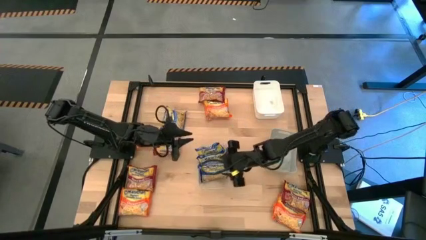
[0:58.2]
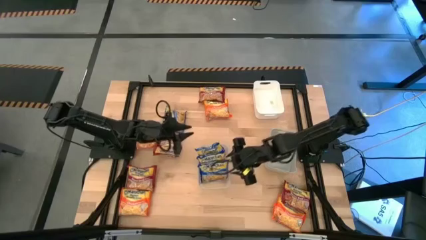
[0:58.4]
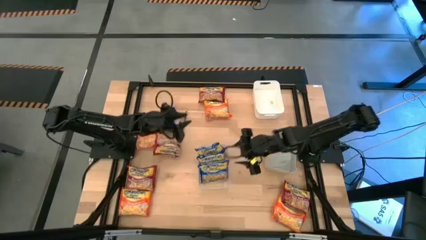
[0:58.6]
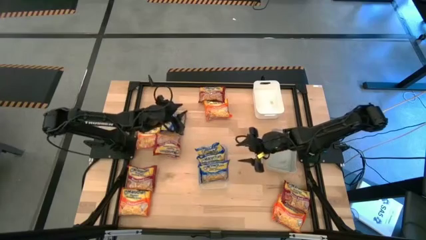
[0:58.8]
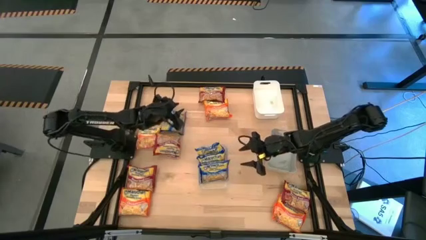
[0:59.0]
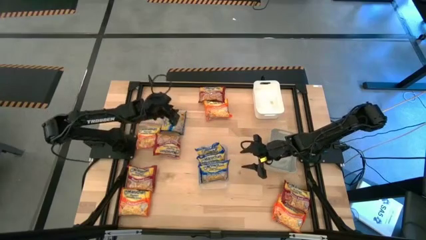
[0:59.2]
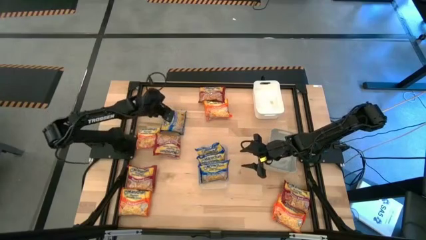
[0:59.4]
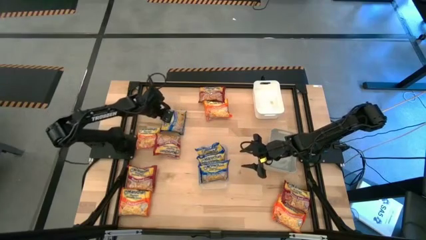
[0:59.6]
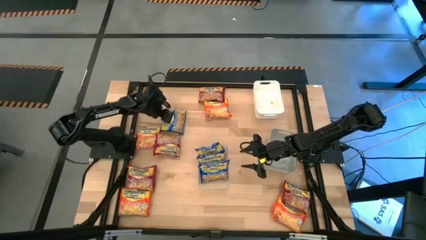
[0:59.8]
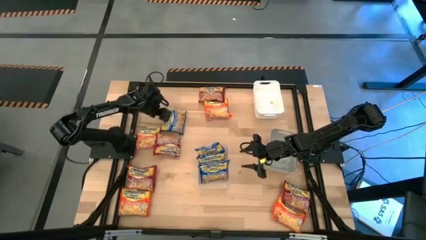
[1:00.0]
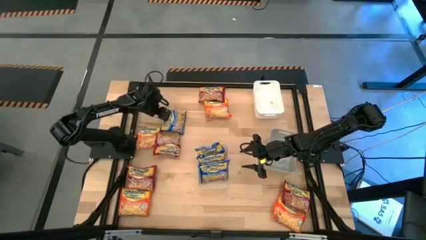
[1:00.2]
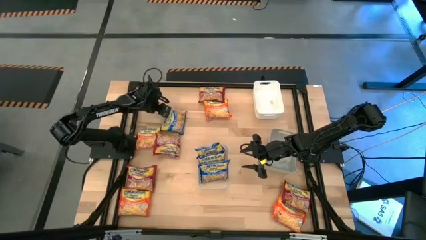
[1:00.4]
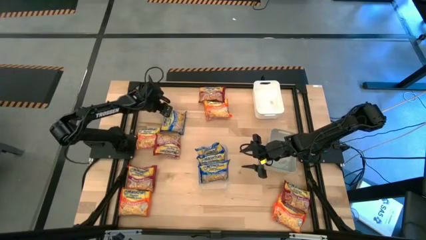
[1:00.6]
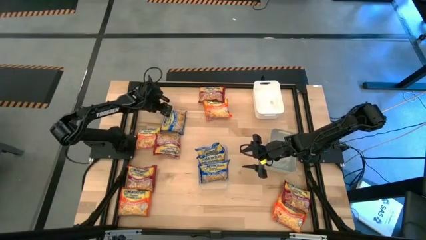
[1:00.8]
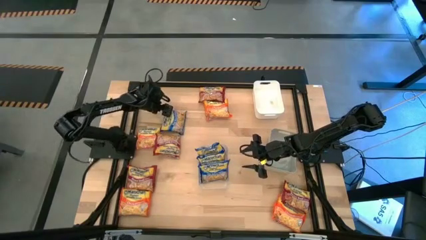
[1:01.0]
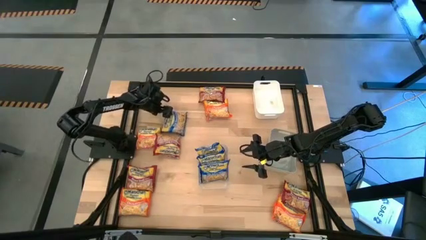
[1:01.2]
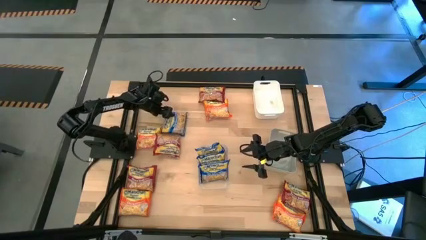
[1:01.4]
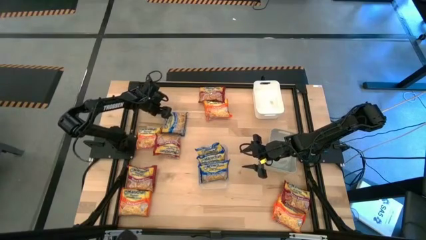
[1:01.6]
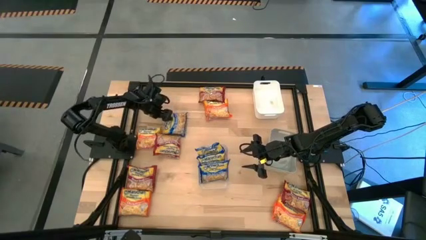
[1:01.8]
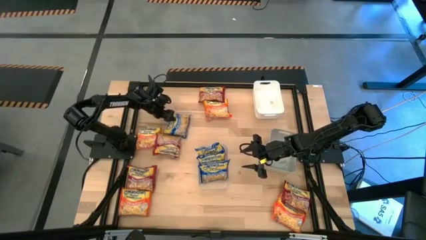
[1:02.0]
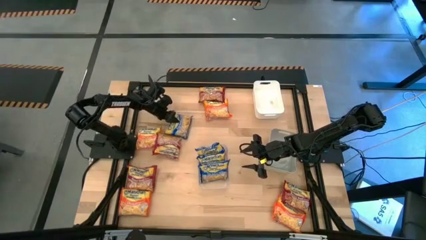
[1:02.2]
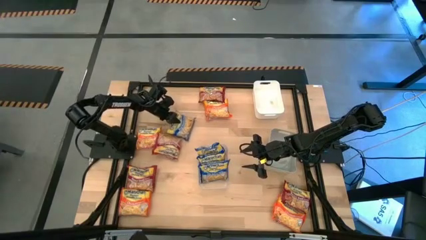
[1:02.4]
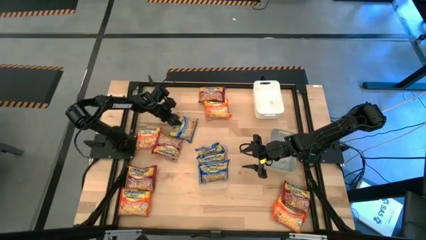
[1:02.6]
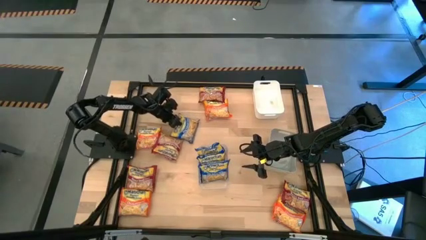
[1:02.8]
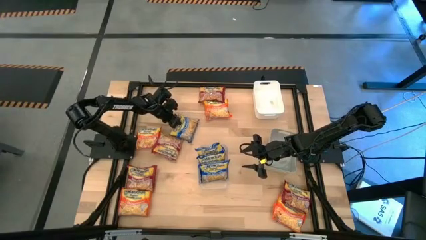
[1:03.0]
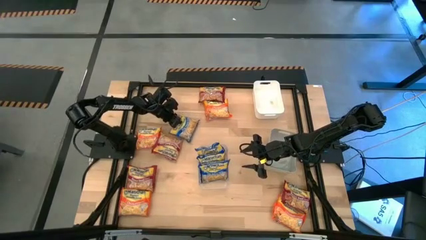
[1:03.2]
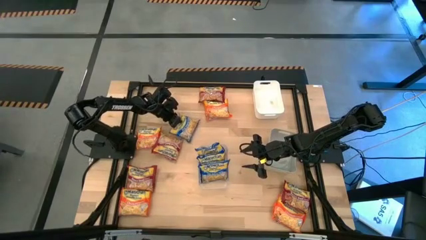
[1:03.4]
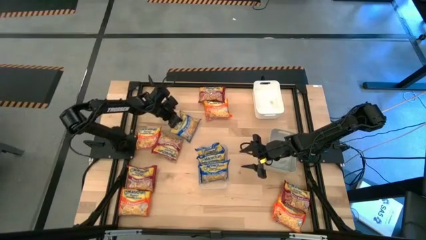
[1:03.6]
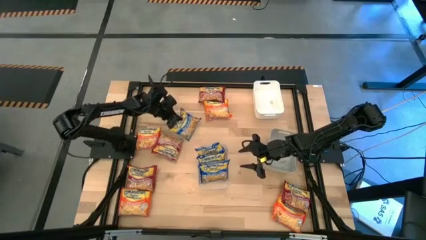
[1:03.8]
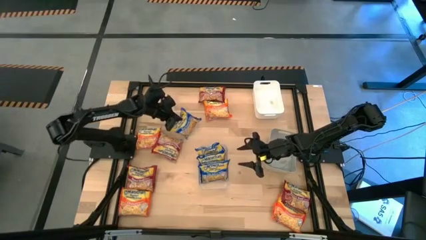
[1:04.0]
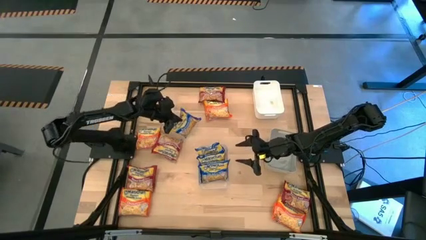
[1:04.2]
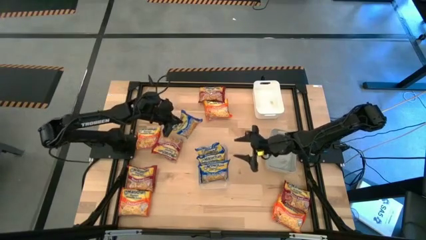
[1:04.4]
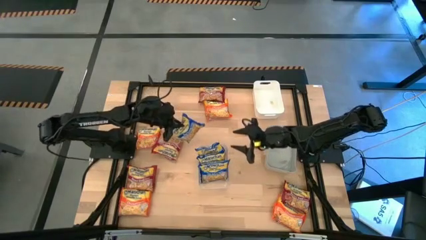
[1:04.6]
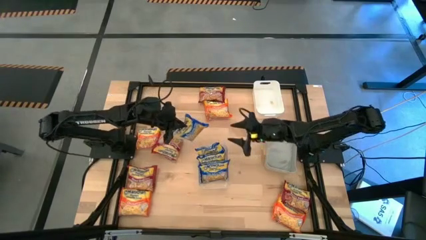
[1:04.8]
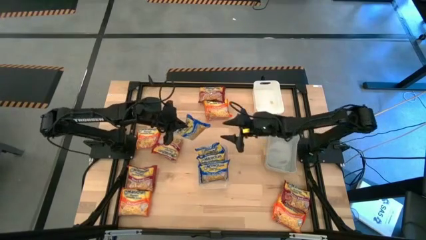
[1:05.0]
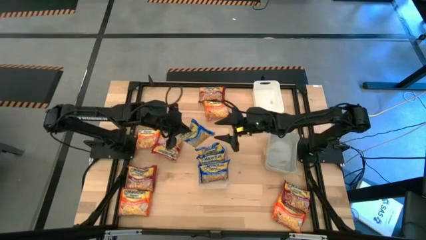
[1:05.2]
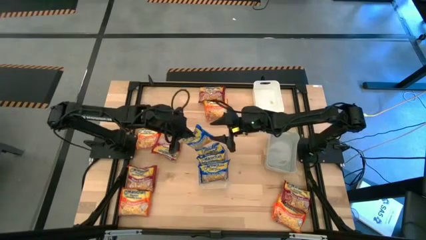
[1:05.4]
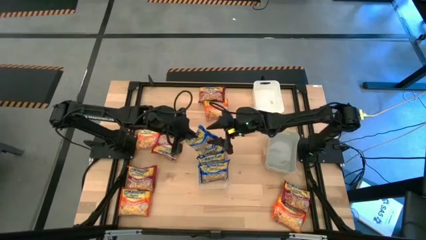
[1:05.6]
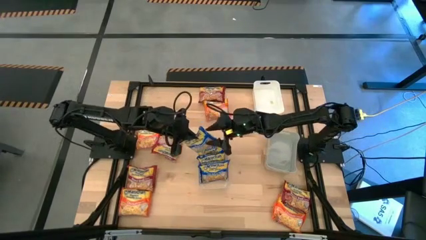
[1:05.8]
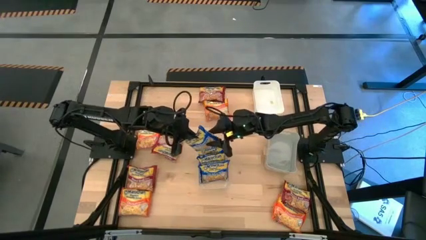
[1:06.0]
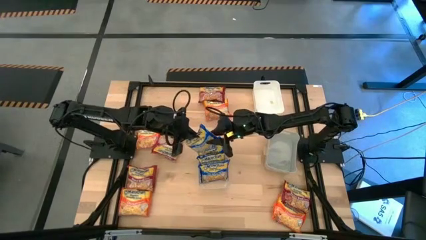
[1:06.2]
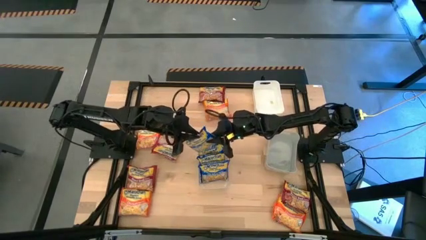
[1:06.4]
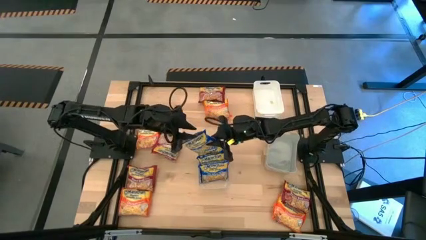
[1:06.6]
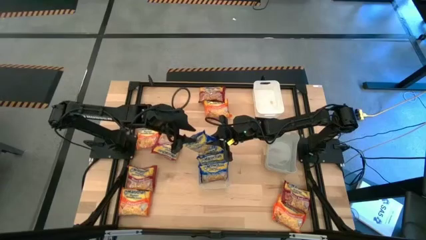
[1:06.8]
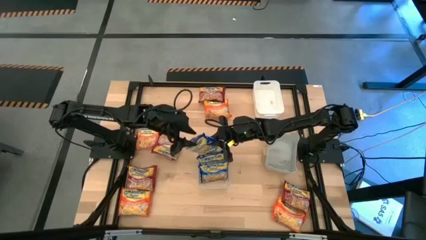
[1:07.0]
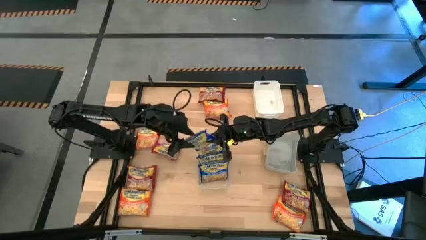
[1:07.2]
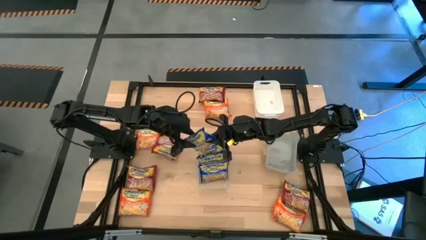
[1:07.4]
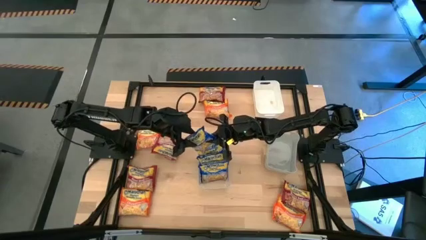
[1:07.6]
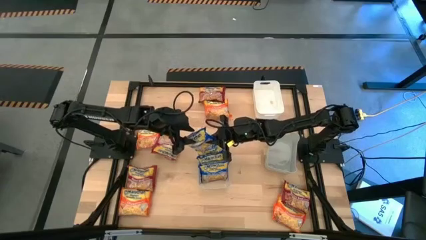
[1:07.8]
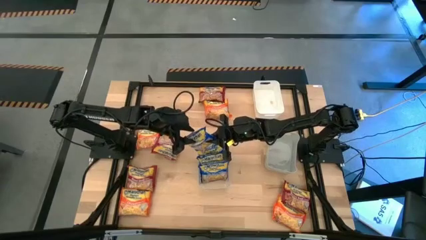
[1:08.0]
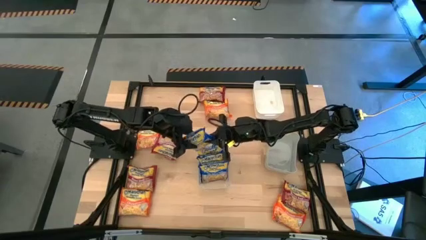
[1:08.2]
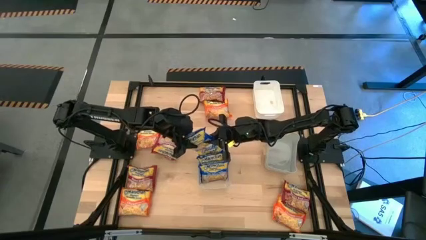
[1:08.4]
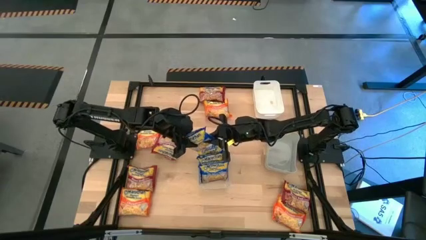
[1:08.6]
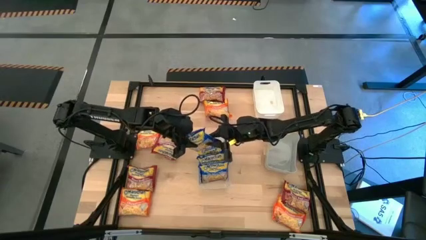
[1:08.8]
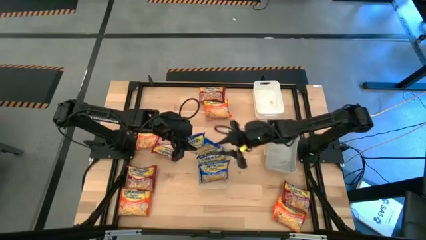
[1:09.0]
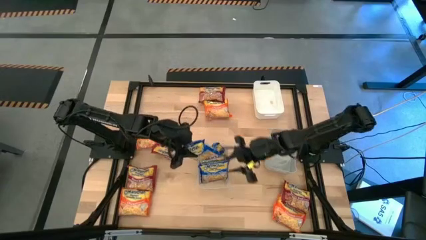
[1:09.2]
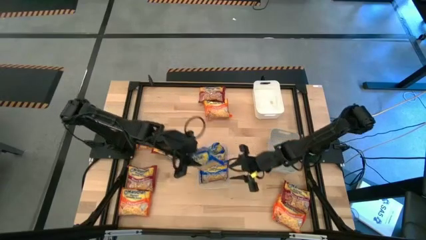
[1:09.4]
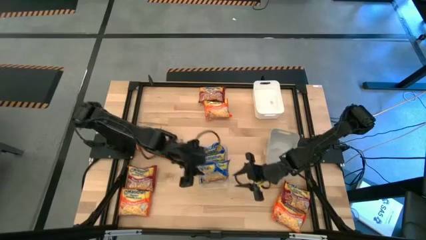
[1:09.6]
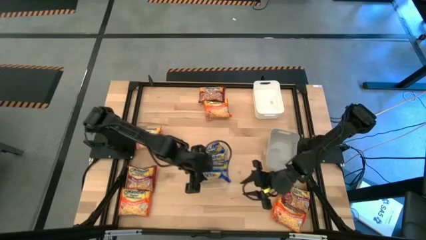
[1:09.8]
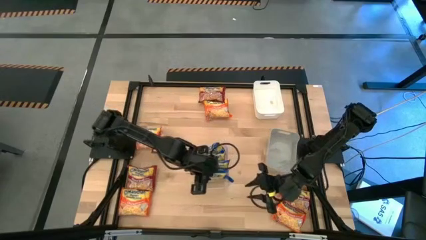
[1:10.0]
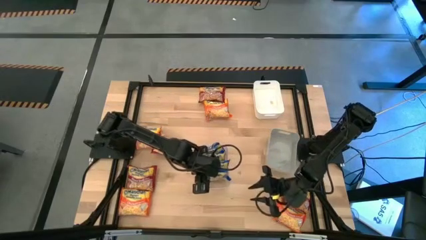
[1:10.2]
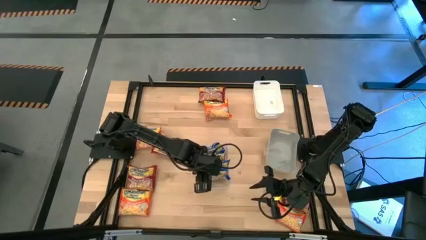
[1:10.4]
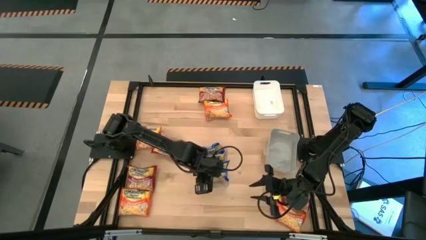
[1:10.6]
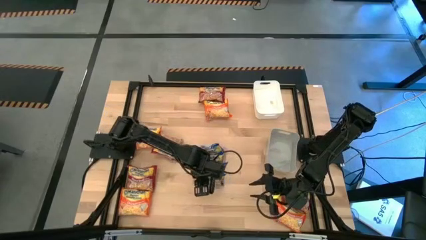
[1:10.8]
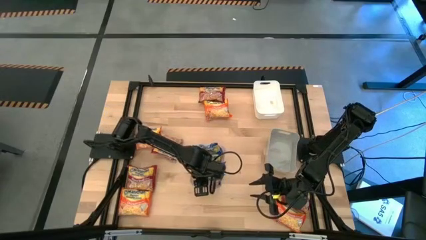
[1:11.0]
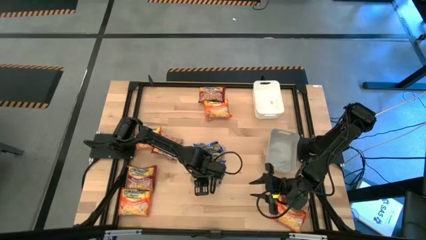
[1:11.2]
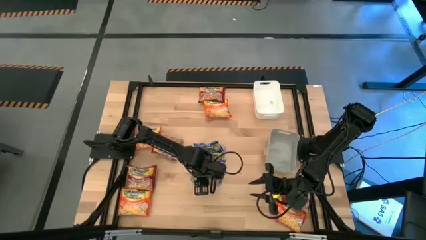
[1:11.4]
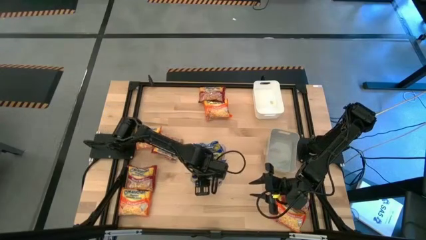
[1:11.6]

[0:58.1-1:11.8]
Task: Sort Maruchan noodles
Put the blue noodle pack into the transparent bin
